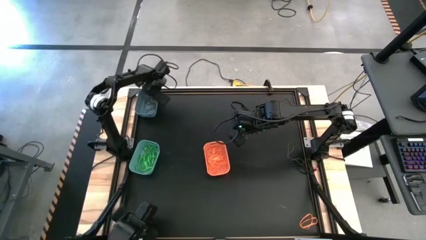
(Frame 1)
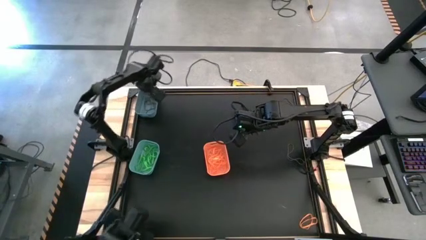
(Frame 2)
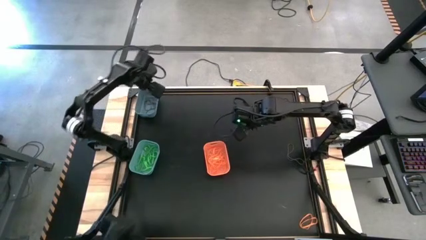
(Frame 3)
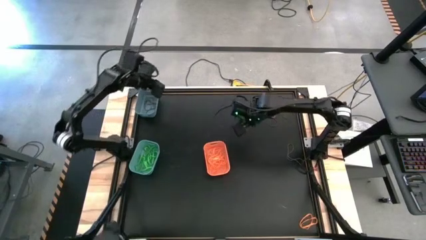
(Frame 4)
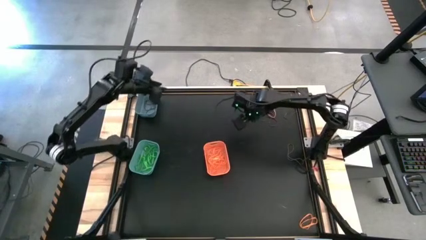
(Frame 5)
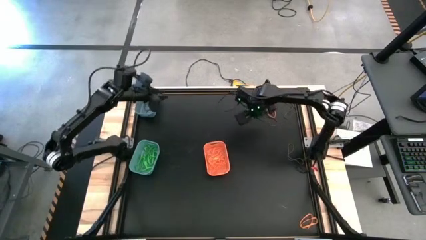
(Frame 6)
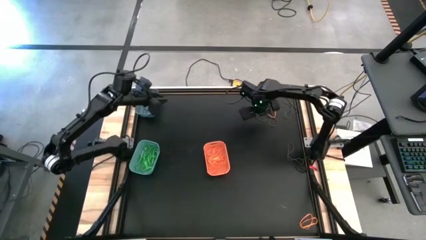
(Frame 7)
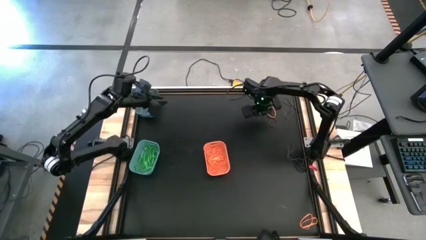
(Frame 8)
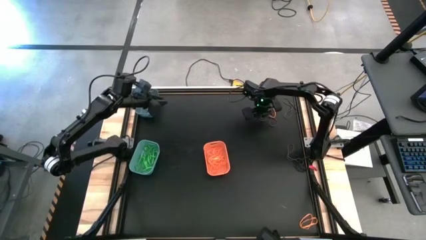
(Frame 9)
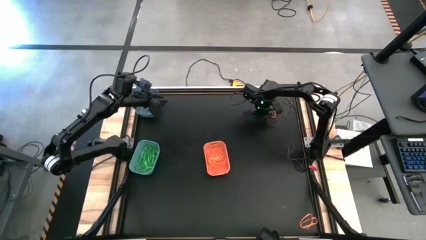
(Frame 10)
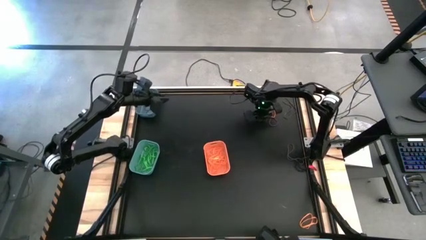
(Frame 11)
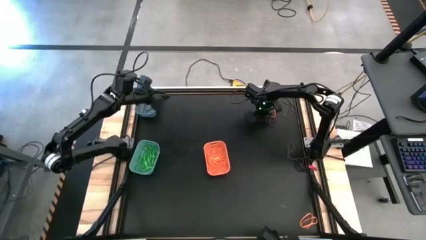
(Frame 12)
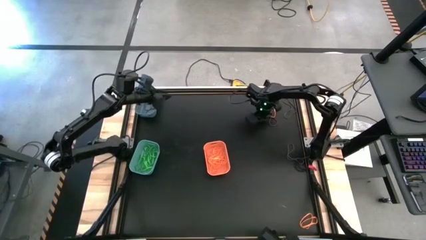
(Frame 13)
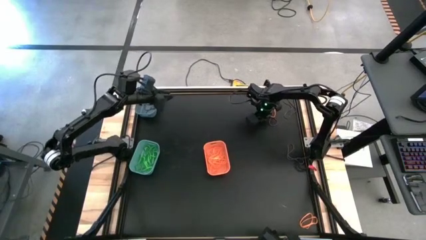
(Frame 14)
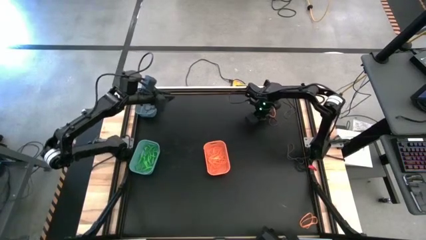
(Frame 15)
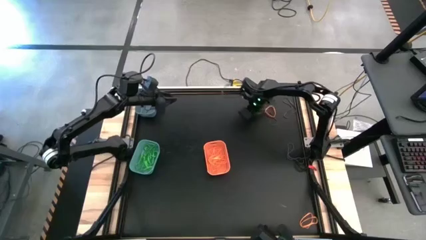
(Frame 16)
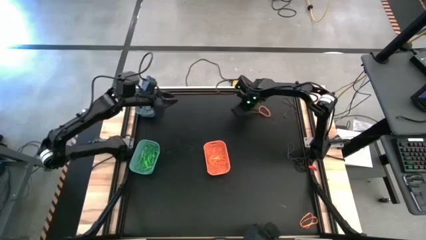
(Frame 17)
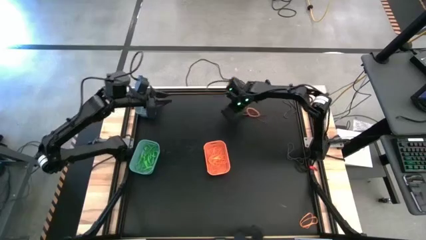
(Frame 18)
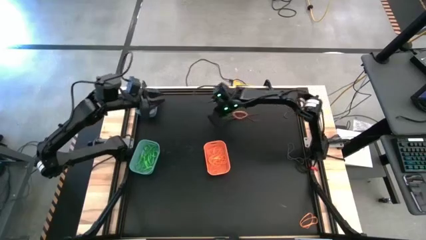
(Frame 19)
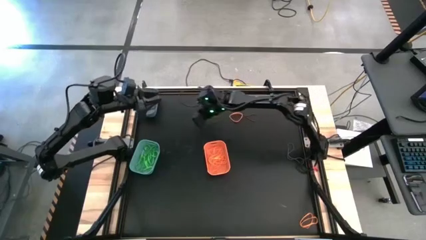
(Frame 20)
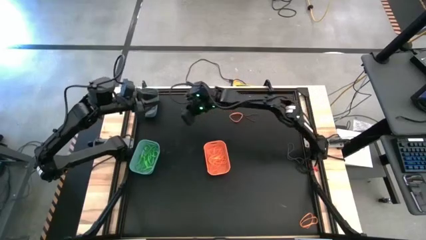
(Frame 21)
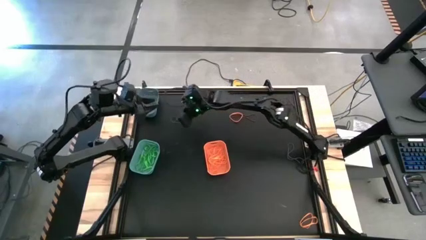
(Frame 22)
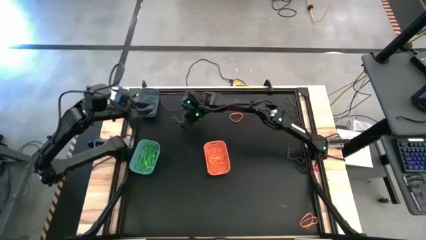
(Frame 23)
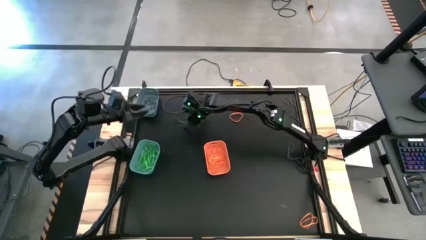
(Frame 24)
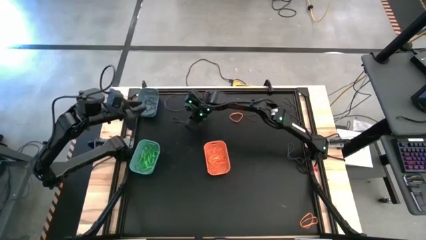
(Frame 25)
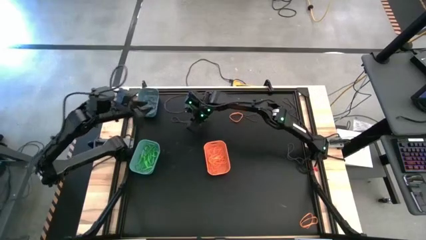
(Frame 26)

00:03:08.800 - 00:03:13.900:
Task: Sort rubber bands into baskets
Move the purple rubber band

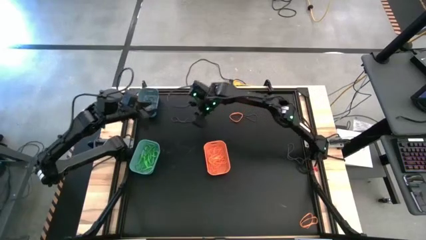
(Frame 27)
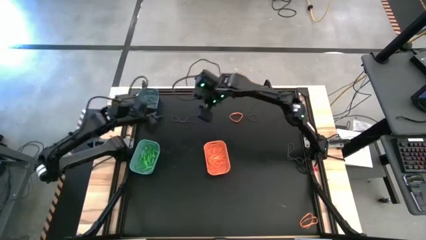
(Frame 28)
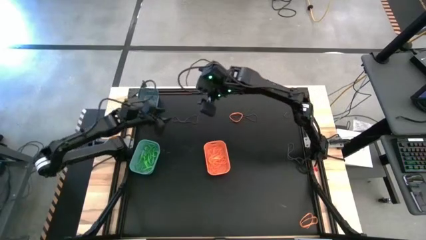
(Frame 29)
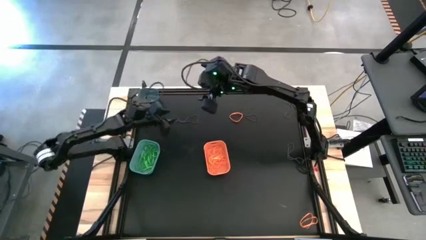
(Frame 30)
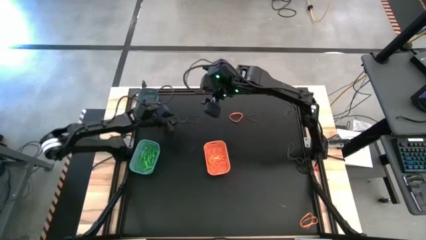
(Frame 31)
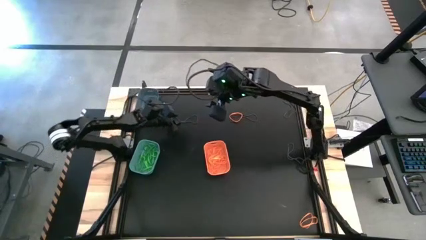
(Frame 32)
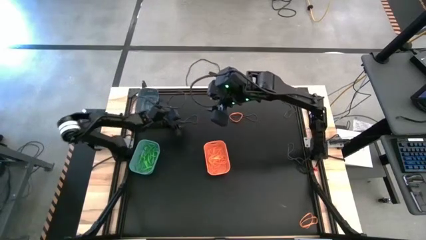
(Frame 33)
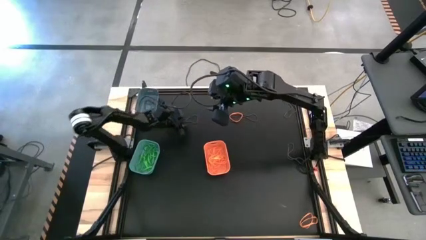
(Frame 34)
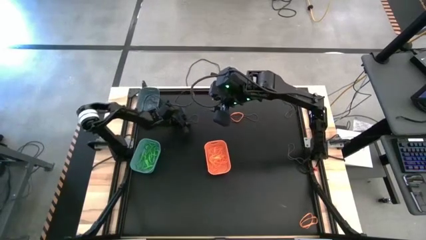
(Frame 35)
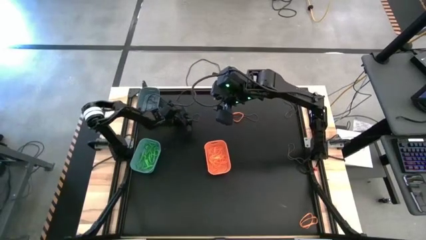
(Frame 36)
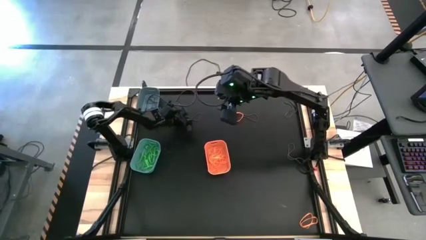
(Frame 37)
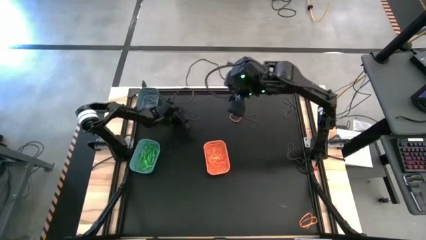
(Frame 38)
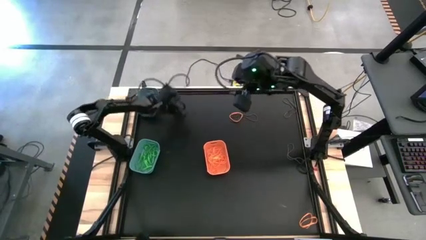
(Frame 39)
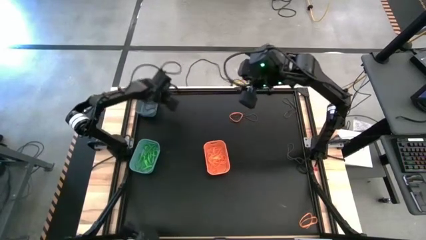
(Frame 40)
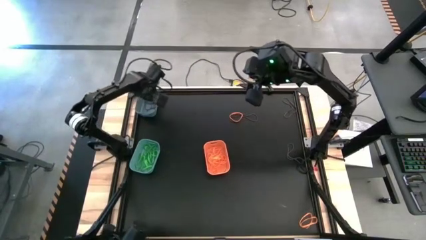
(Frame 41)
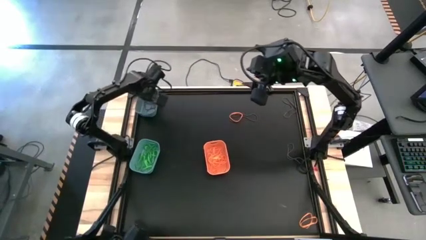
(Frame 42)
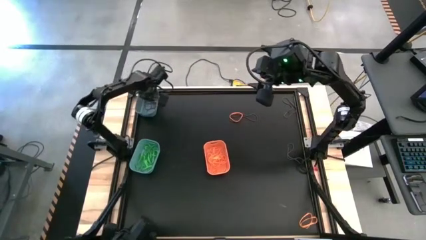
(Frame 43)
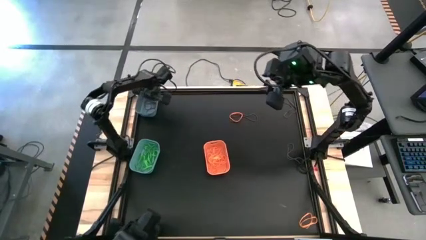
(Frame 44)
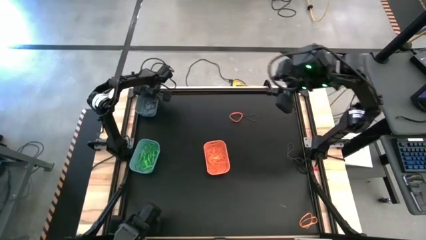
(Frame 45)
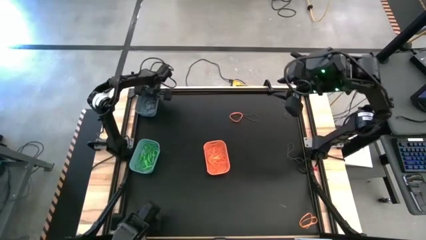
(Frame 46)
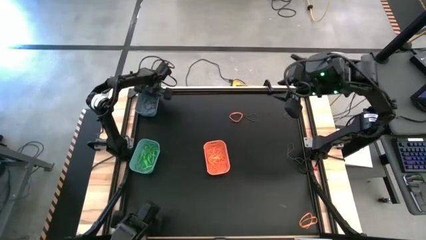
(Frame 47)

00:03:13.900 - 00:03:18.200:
Put the purple rubber band into the sky blue bin

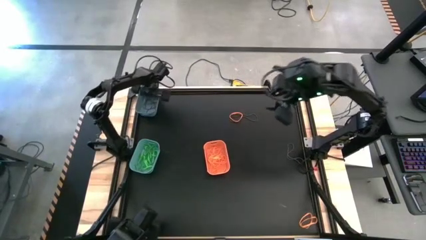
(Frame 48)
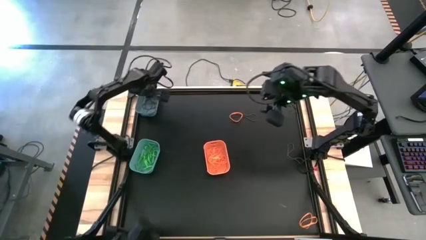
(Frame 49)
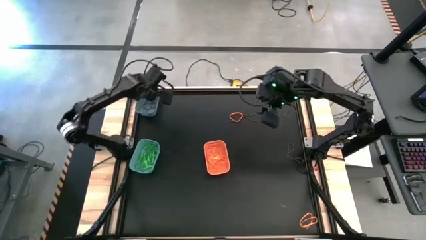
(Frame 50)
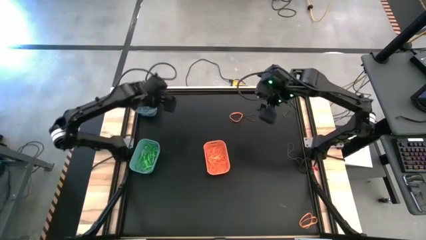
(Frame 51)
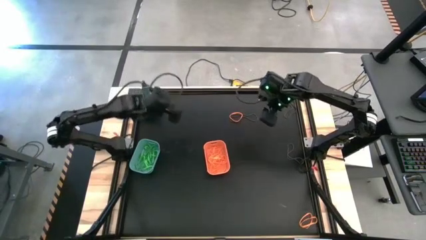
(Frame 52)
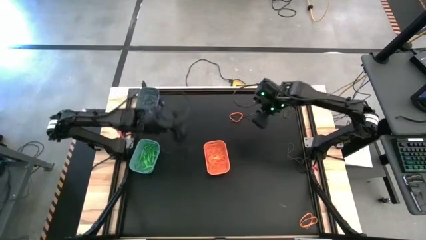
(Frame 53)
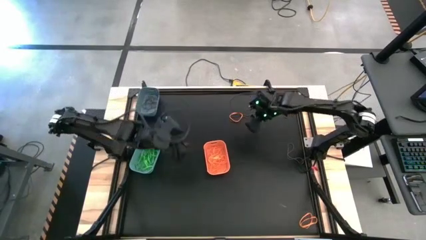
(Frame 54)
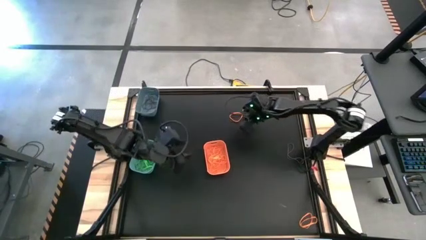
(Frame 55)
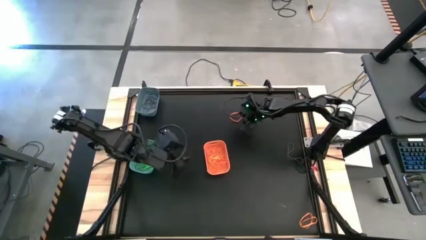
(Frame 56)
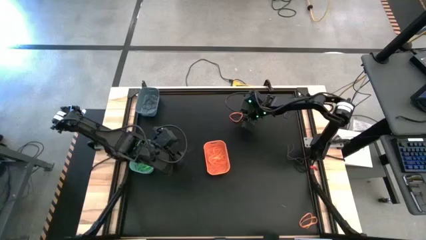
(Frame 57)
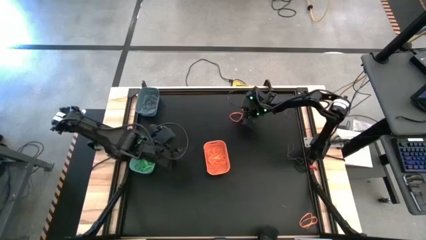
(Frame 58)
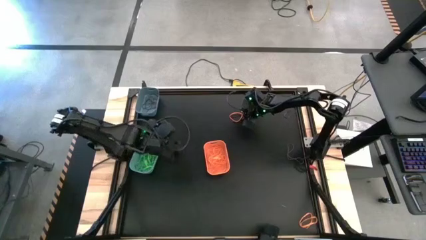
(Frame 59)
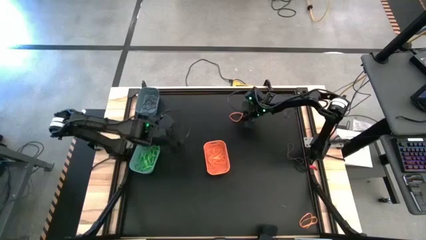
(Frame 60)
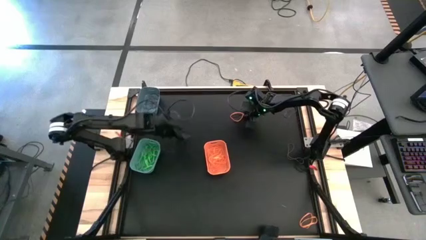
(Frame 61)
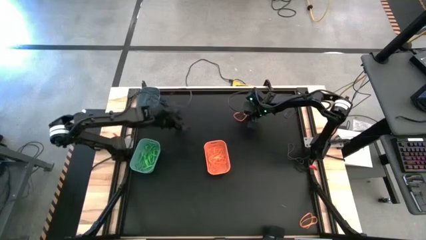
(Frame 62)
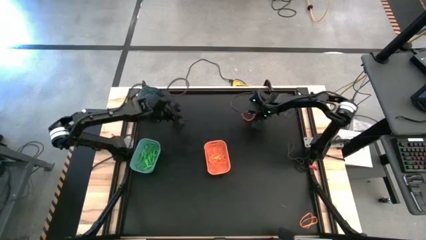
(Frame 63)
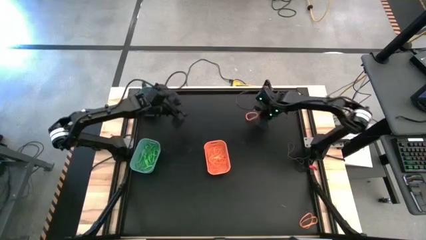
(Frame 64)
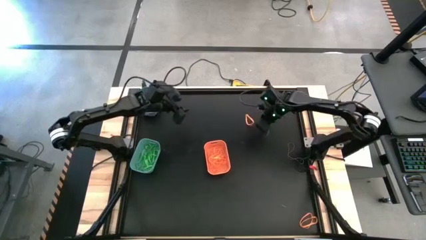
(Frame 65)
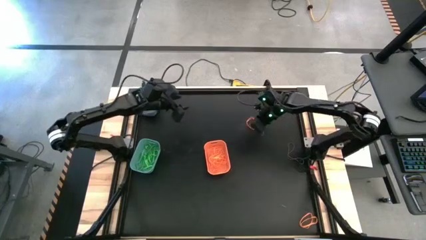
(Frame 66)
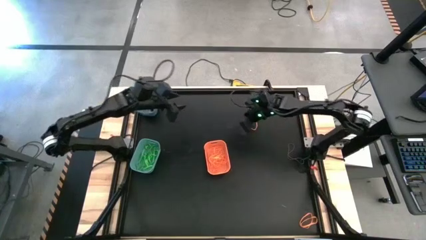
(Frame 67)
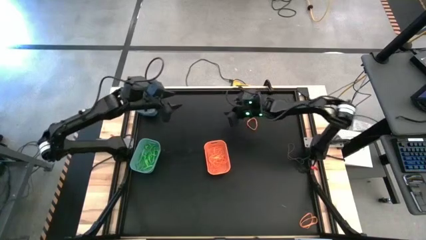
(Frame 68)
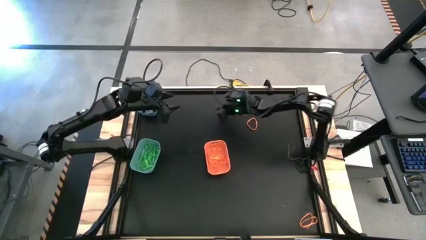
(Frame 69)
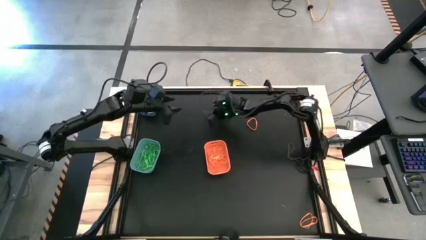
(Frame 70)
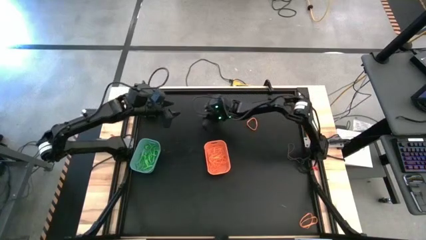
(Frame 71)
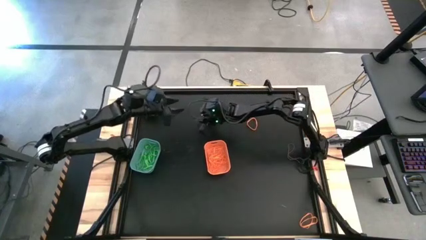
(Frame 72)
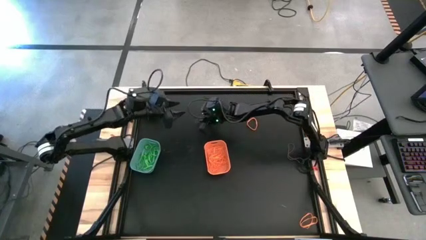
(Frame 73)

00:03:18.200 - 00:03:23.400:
Move the purple rubber band

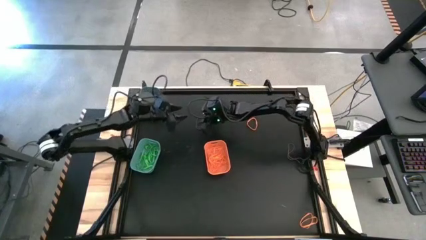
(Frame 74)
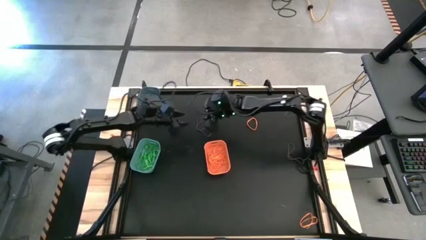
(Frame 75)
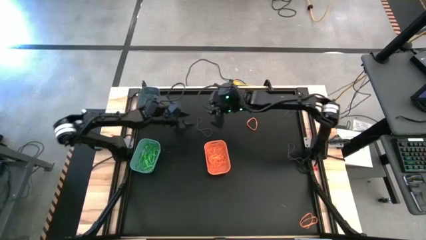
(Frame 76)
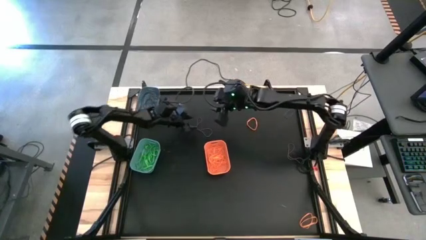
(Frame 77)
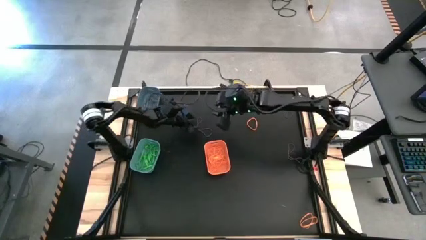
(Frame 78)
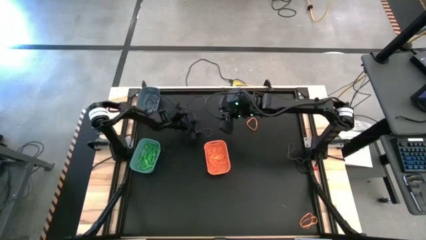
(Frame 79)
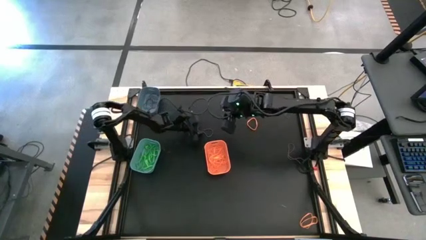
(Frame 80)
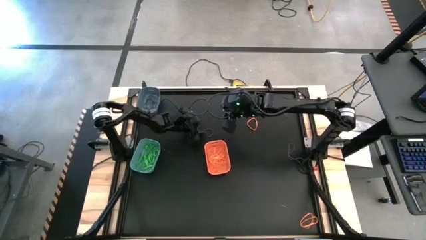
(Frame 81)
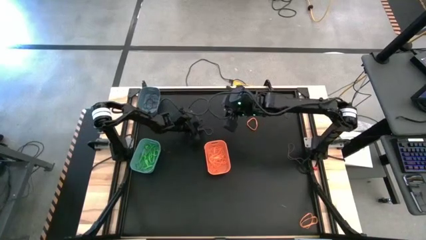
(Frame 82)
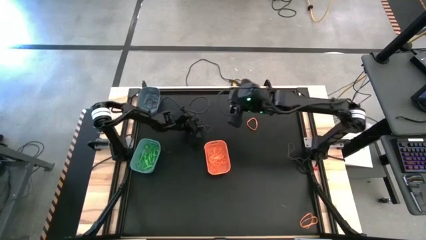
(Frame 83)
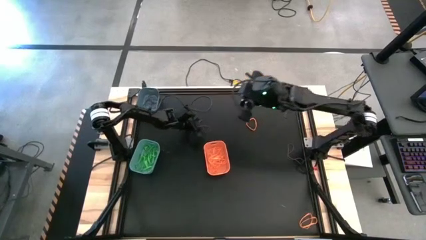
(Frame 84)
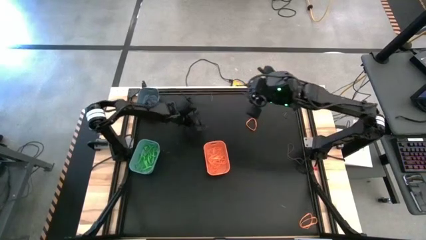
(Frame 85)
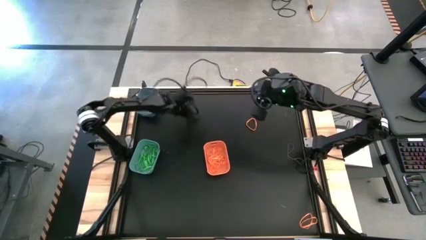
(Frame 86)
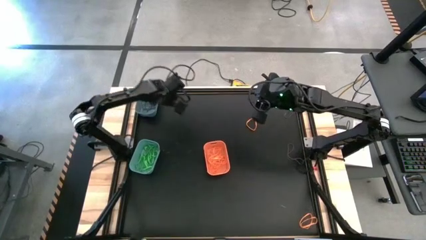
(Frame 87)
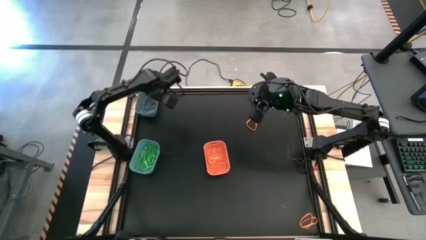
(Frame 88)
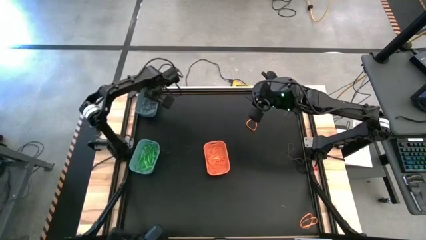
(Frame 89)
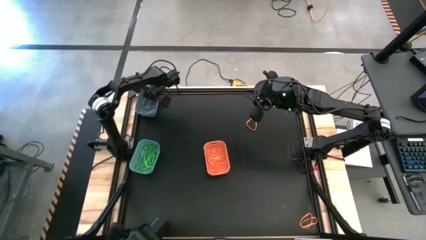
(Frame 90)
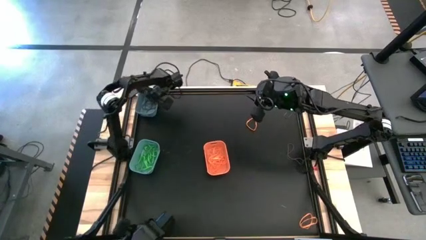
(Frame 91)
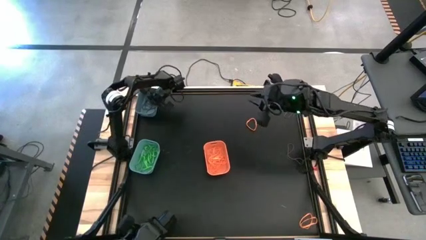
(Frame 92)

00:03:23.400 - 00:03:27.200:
Put the purple rubber band into the sky blue bin
